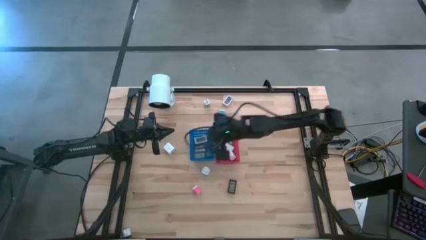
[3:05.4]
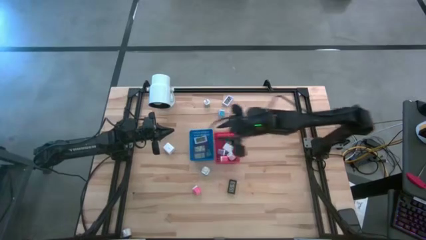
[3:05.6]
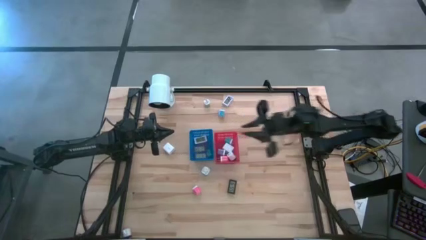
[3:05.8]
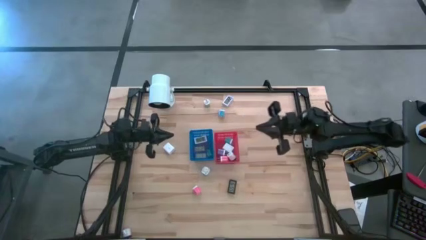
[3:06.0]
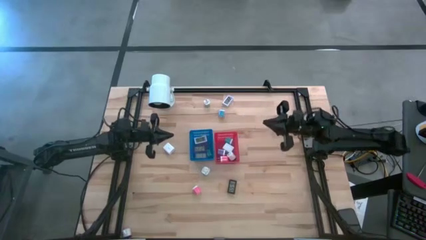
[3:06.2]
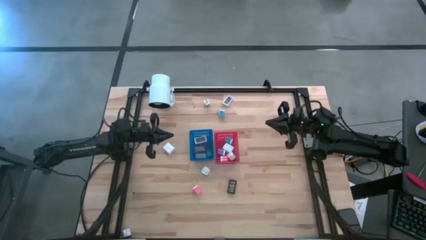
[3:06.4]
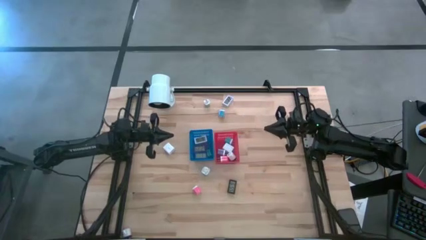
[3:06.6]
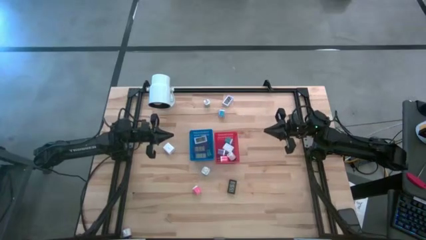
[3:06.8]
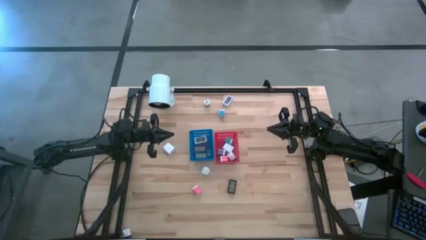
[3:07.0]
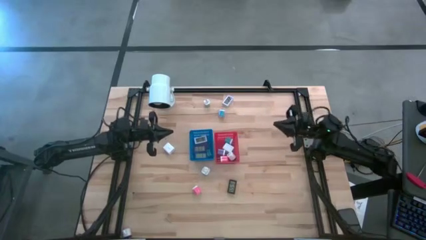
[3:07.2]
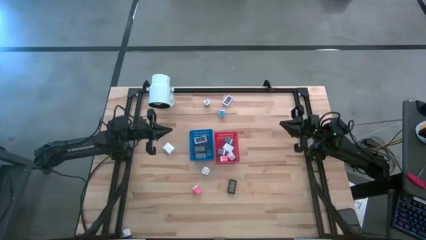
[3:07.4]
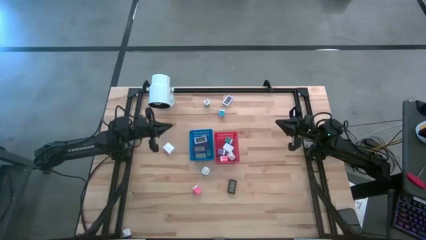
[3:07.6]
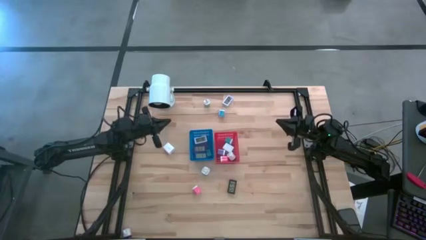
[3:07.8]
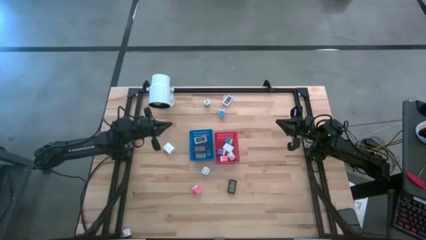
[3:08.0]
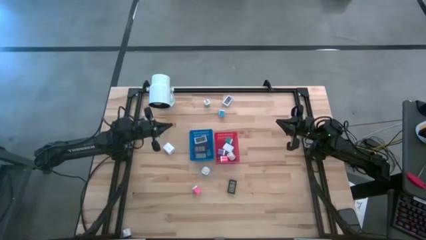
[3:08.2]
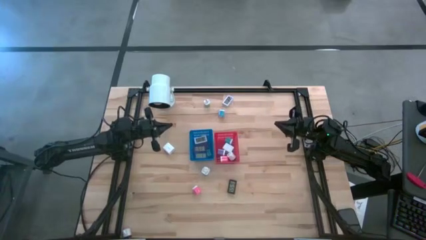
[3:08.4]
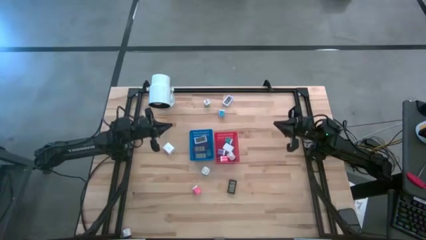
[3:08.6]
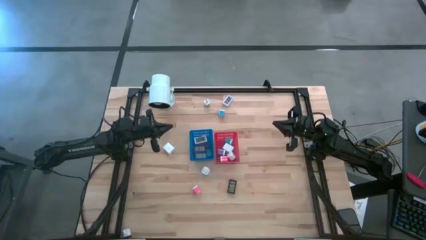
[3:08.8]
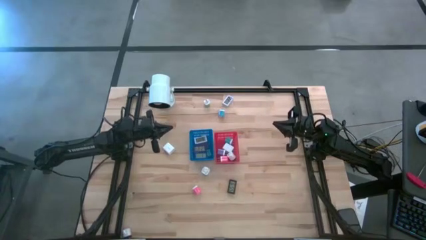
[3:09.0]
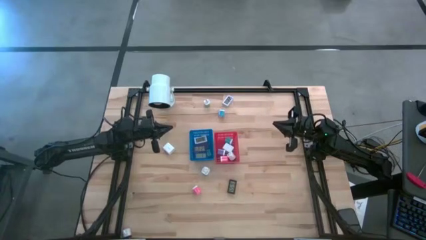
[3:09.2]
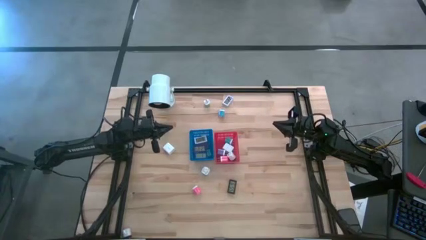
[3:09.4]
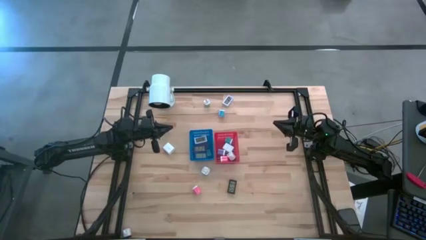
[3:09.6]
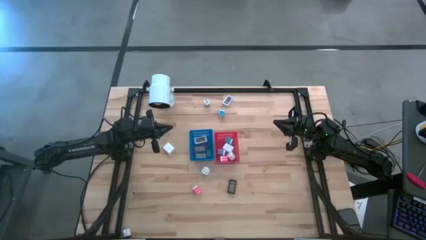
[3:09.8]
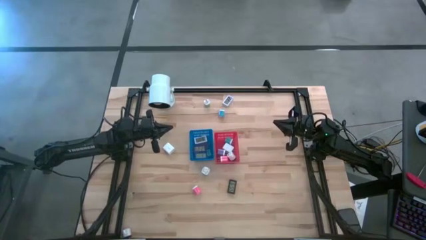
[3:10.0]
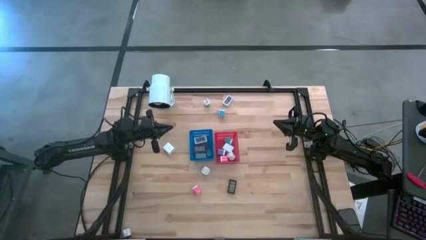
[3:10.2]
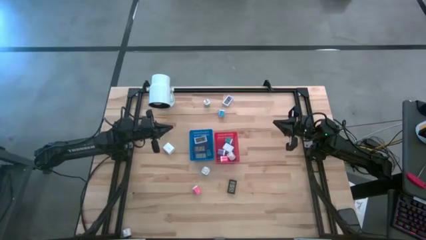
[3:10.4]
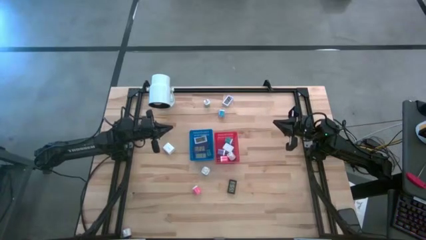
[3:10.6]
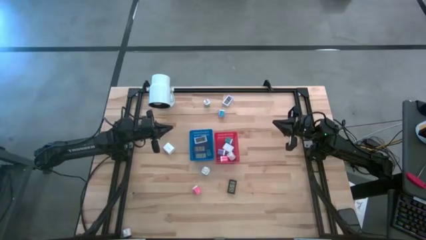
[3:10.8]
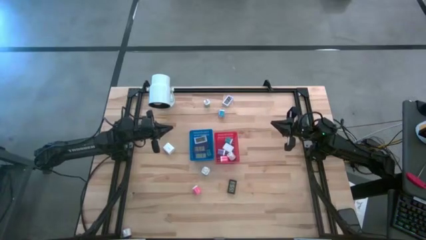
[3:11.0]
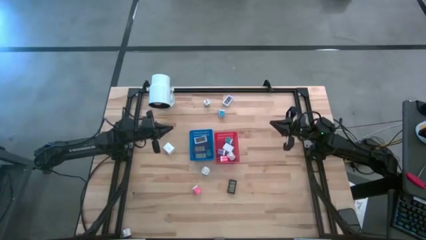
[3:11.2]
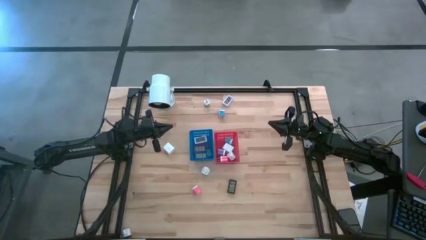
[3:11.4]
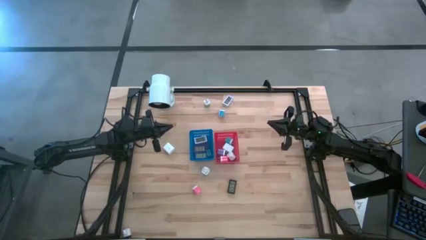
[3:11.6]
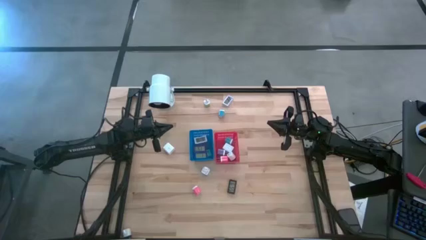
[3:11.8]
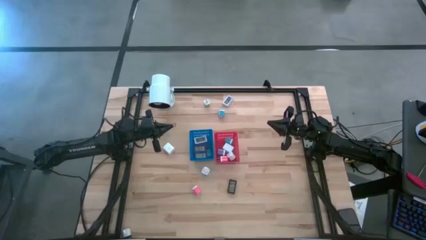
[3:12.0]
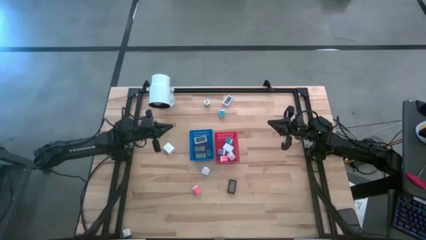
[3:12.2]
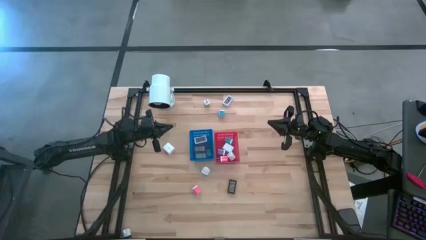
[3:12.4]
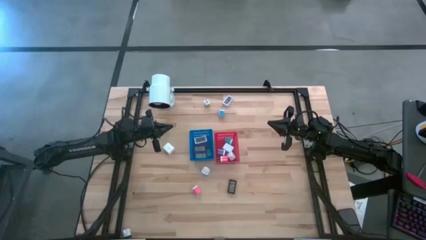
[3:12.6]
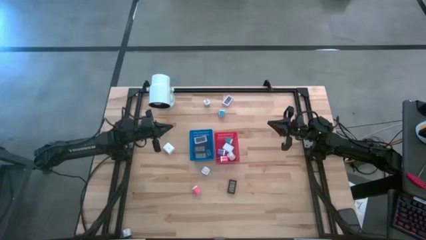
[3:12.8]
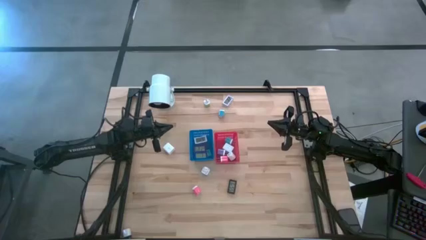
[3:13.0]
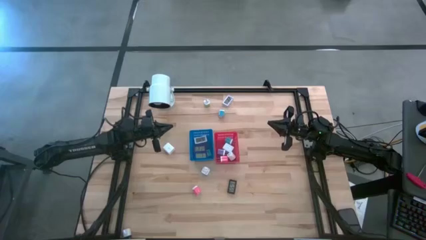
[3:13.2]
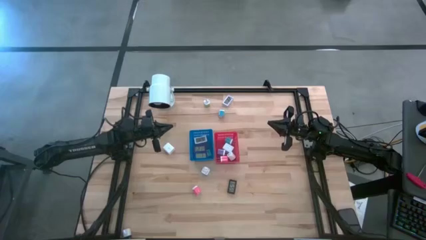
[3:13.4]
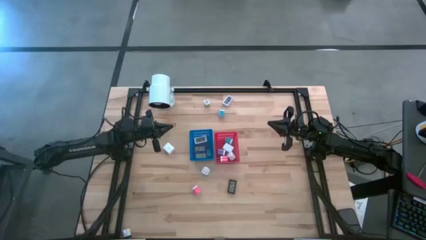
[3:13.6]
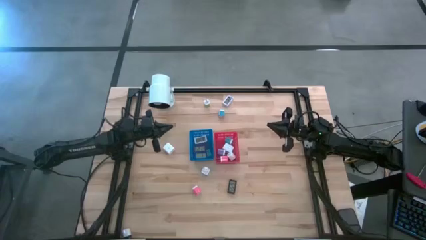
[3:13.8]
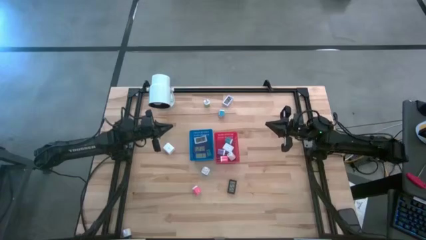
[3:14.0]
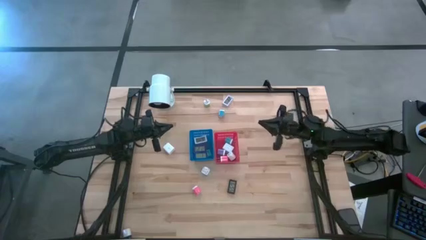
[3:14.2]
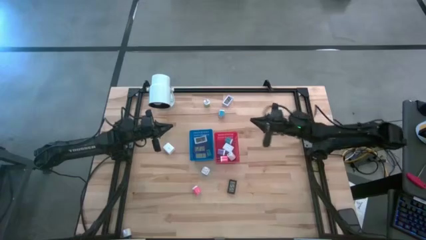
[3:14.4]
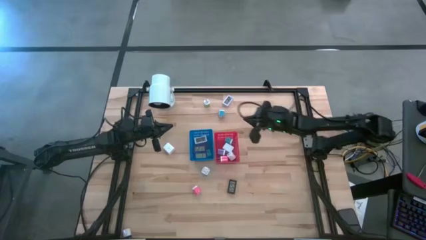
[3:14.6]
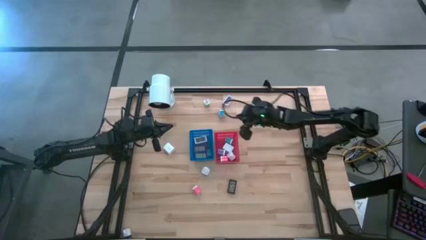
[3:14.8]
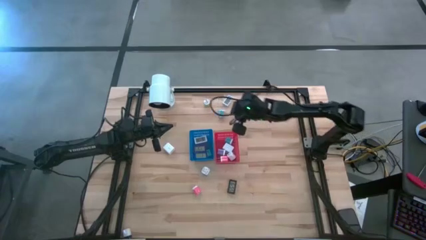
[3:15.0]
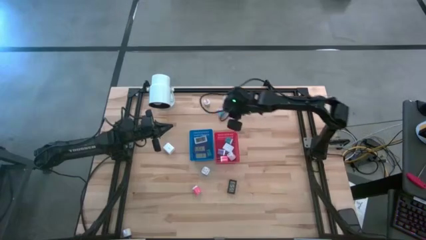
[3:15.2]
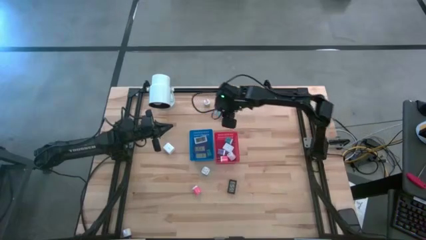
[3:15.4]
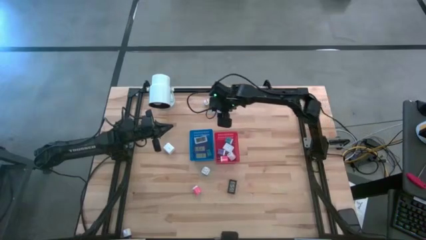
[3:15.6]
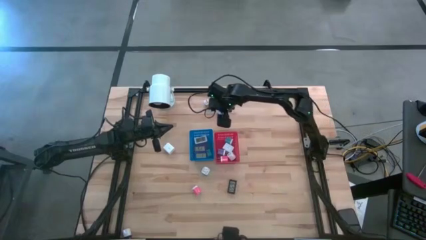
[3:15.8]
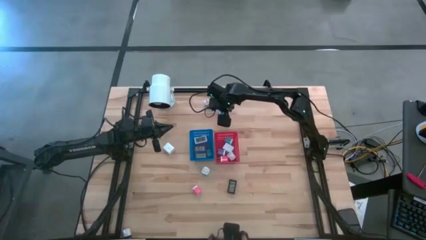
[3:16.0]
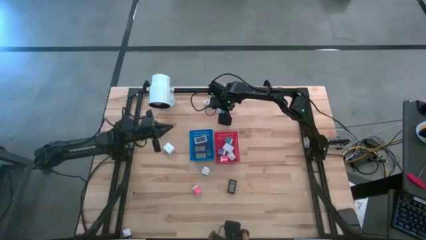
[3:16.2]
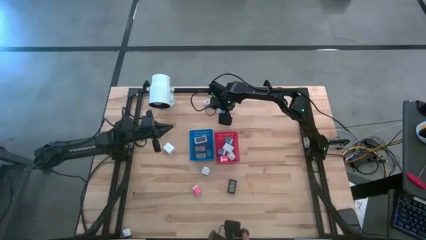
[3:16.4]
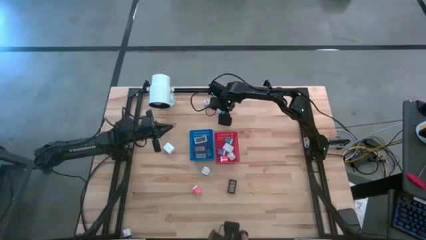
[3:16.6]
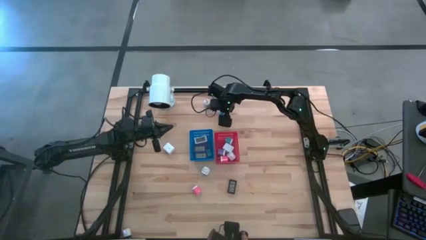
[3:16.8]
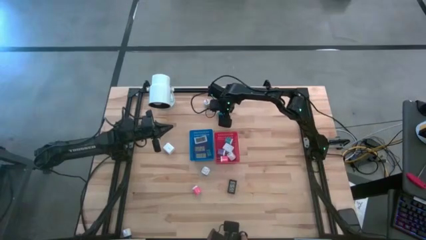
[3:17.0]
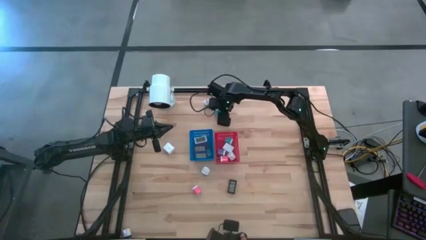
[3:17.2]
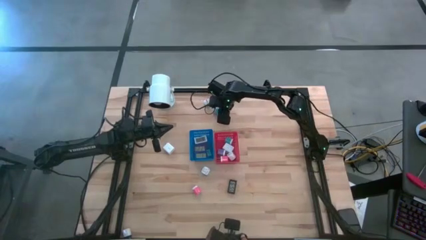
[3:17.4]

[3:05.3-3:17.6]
Task: Pick & Place Office items
Put the blue charger adapter into the red bin

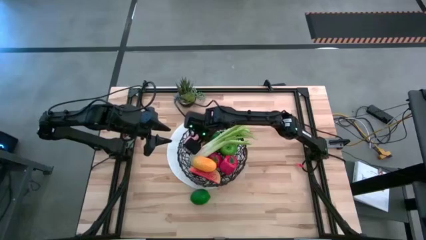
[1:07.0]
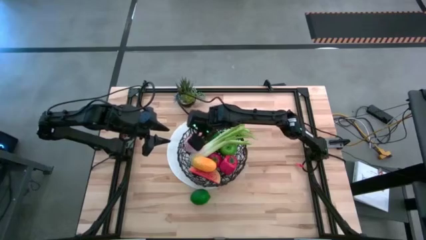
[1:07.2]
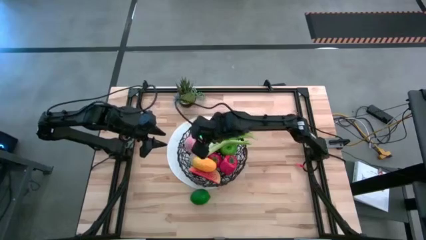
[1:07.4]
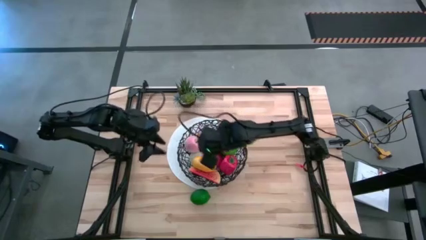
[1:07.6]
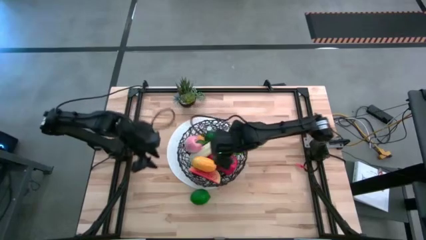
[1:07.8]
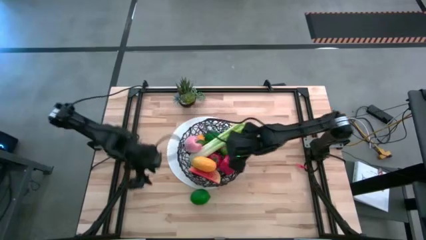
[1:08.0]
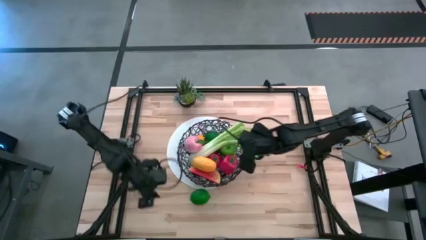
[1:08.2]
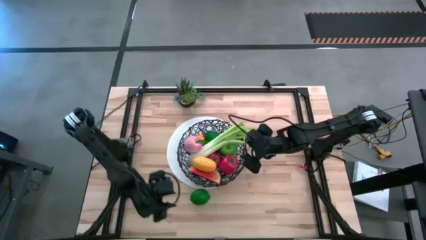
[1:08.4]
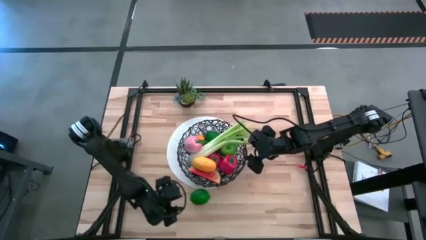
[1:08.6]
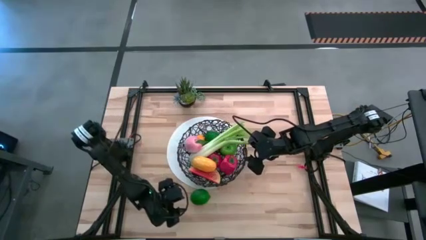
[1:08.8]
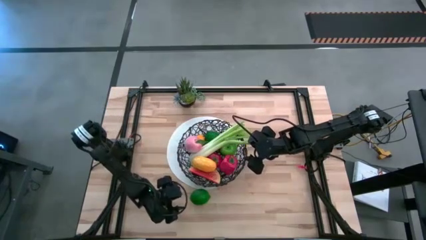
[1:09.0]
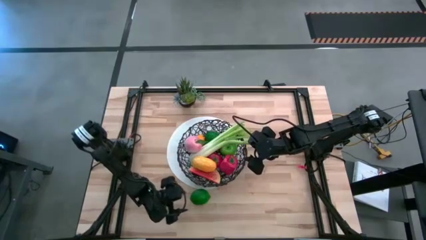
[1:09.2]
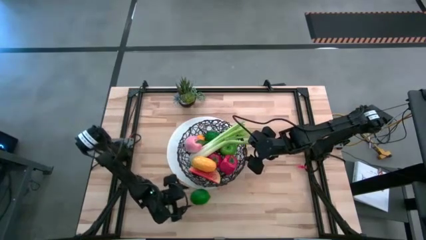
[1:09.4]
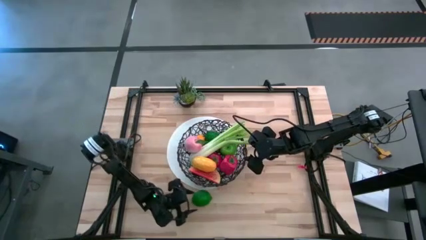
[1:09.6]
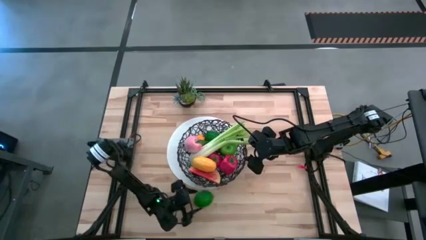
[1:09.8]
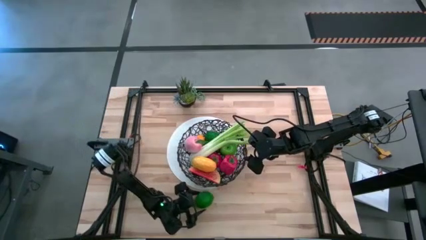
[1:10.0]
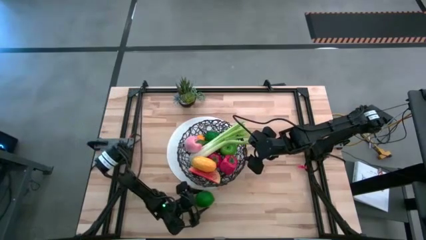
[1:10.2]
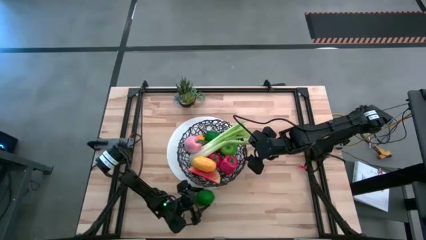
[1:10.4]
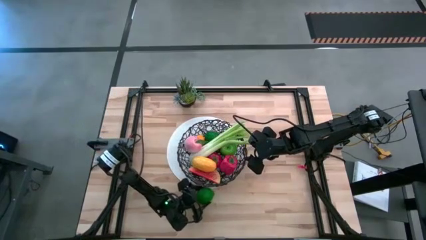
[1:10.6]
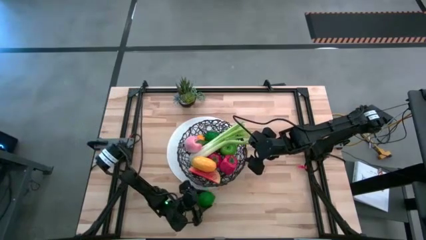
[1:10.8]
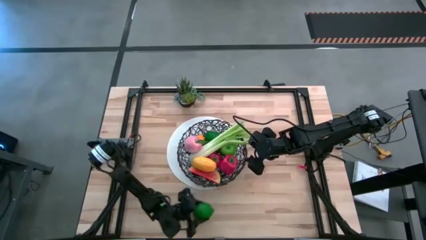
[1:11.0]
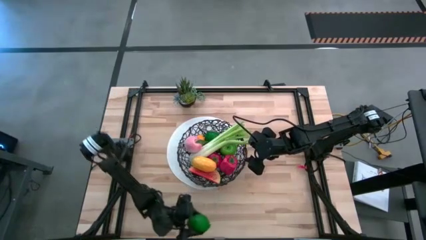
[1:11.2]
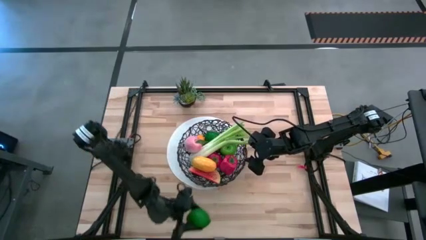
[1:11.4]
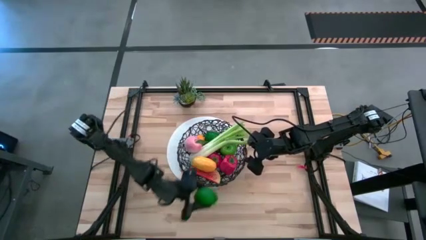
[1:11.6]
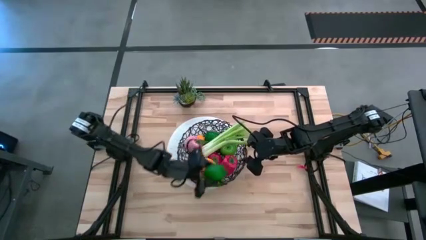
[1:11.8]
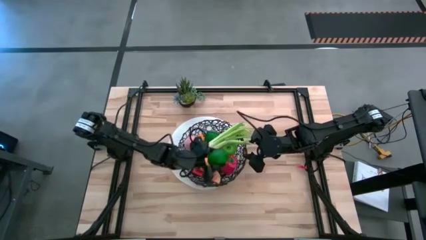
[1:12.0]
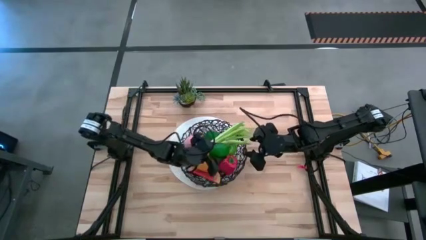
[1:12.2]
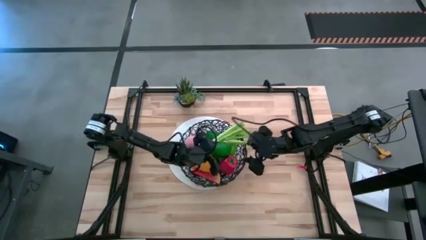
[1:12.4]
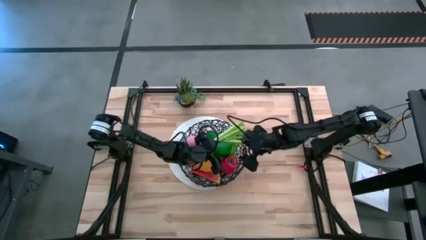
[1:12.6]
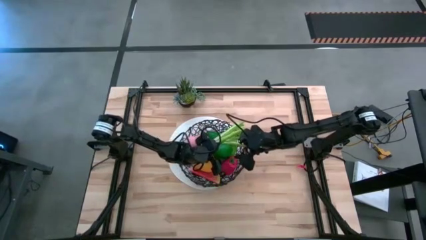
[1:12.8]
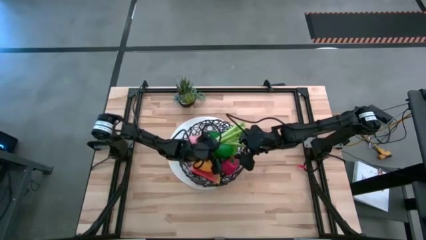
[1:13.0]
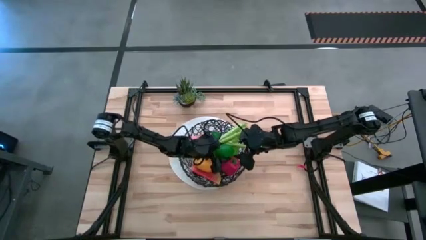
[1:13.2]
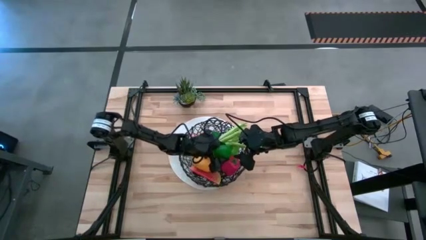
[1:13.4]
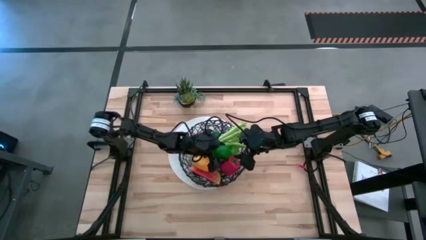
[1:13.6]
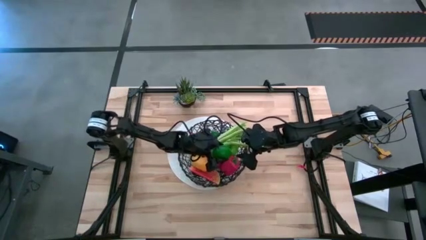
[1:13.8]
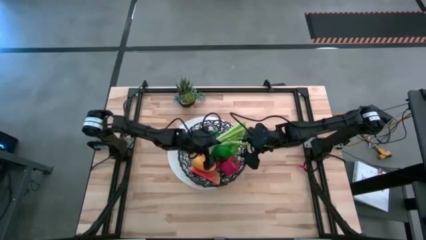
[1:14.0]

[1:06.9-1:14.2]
Task: Build produce basket
Put the green lime into the wire basket
